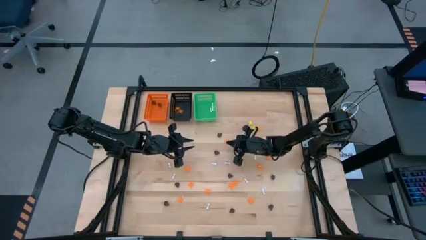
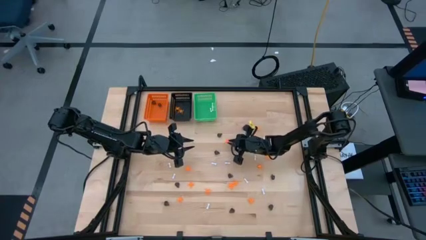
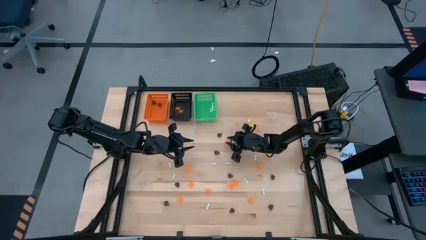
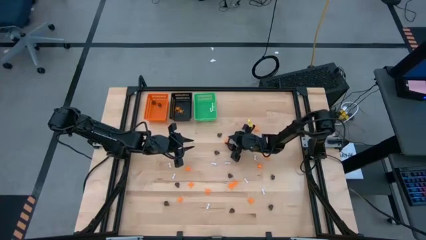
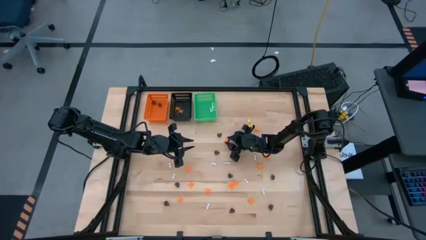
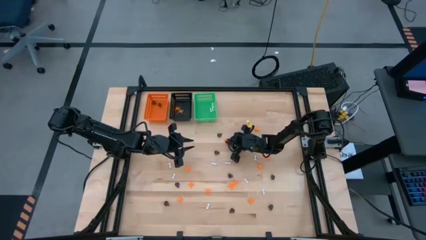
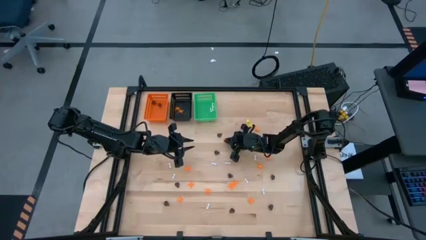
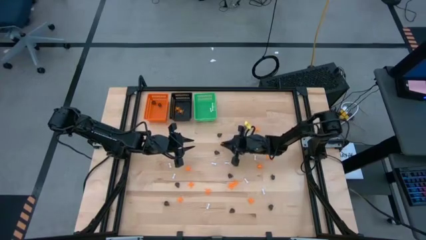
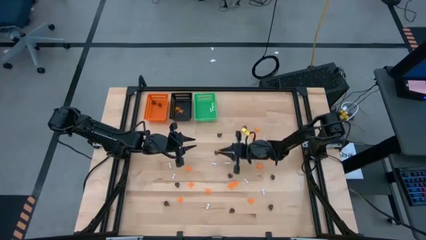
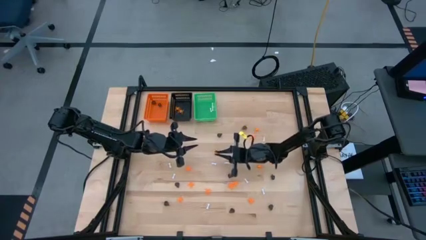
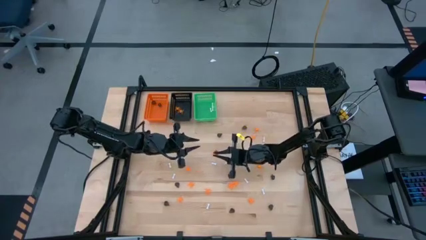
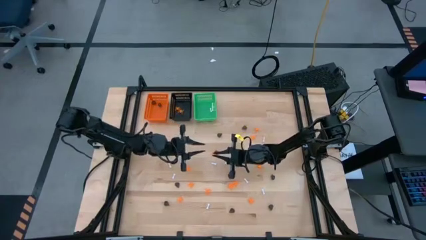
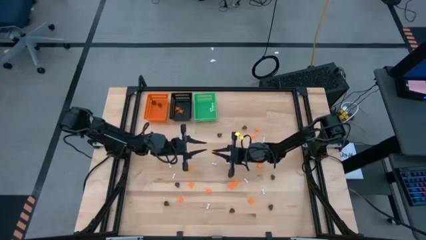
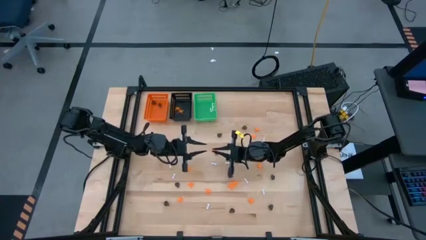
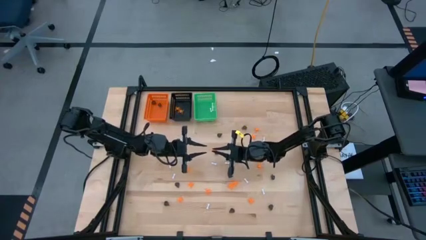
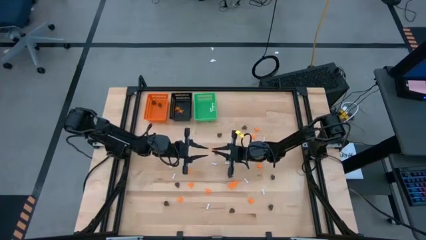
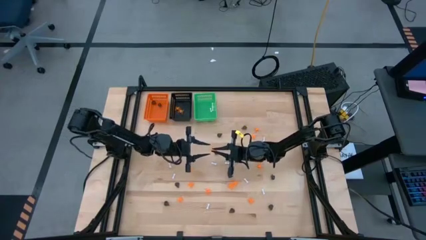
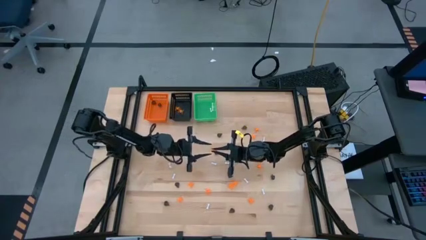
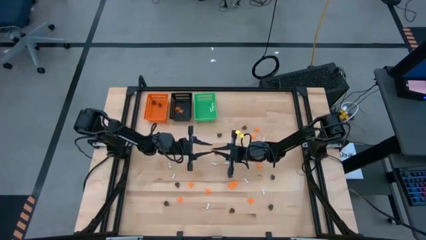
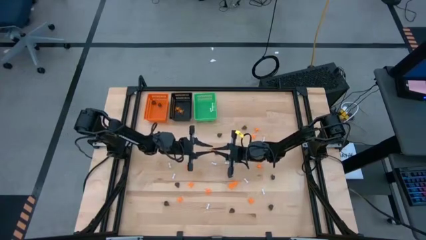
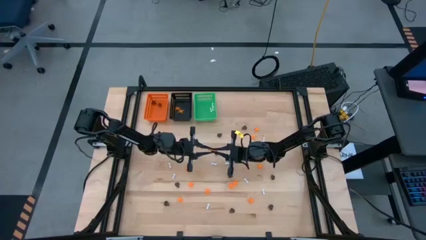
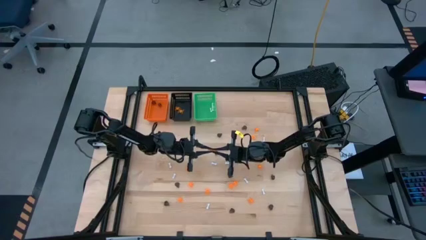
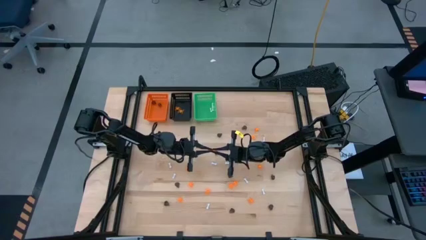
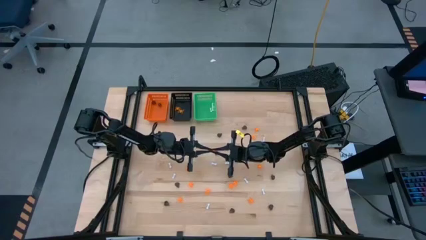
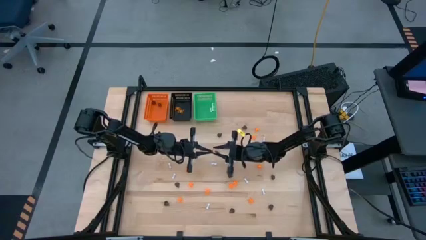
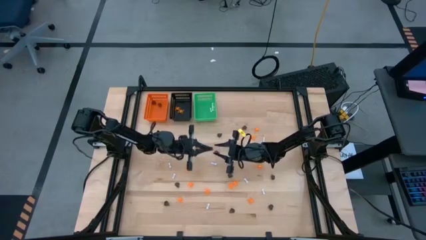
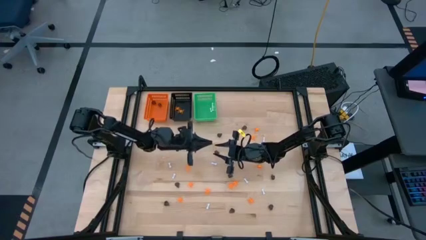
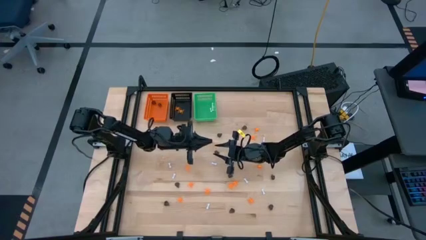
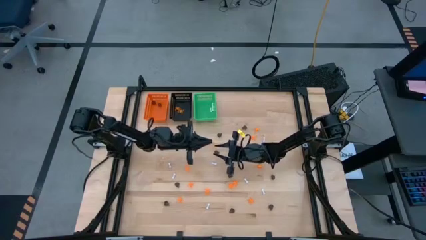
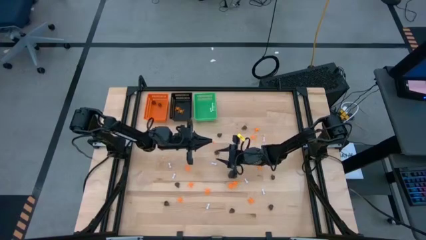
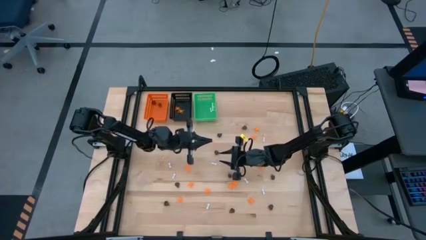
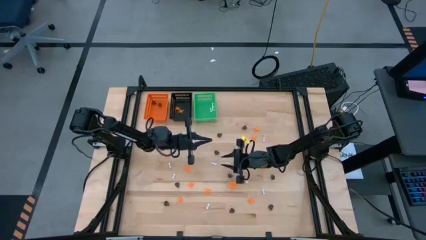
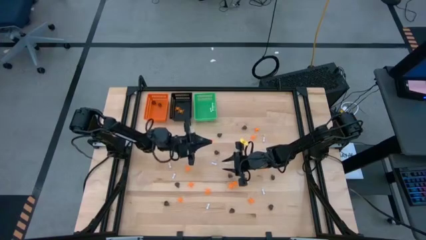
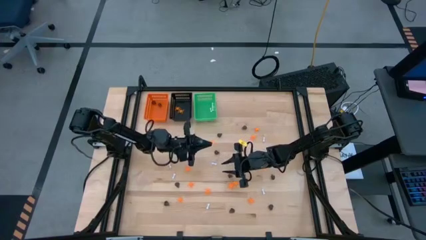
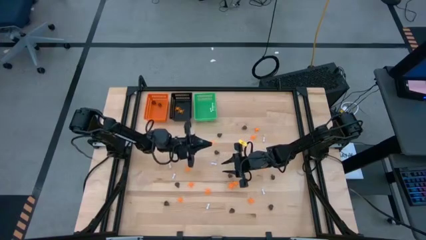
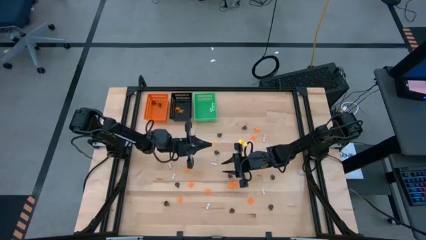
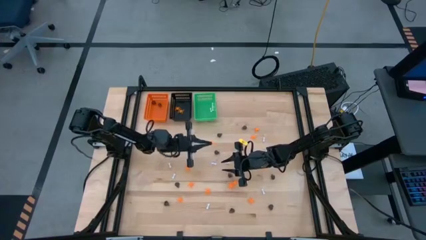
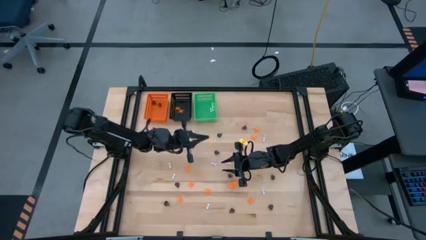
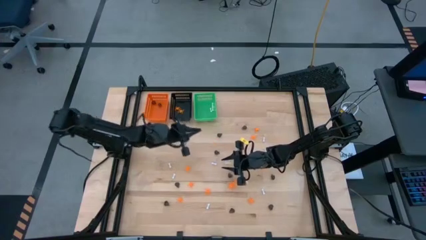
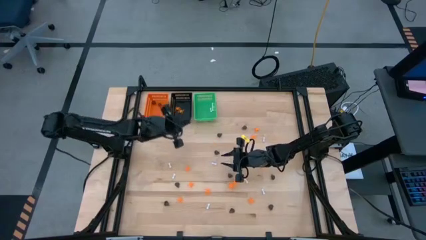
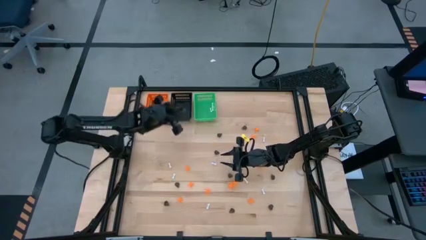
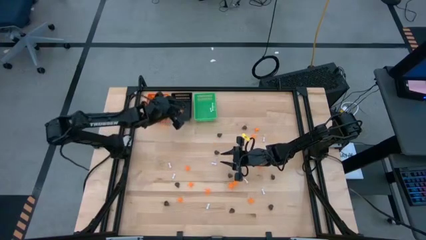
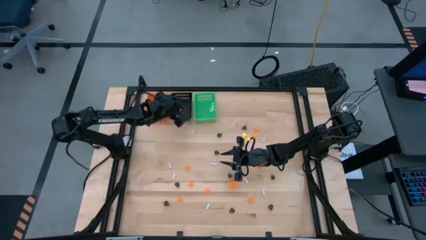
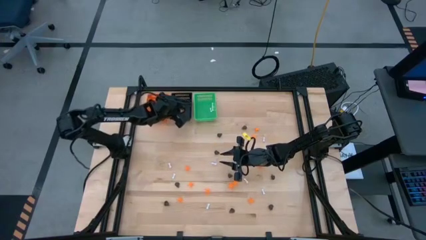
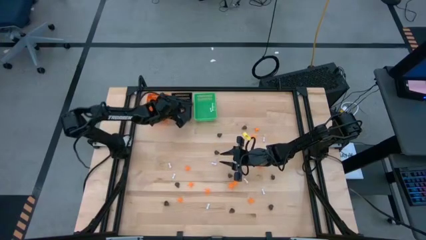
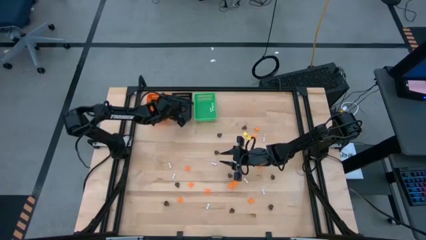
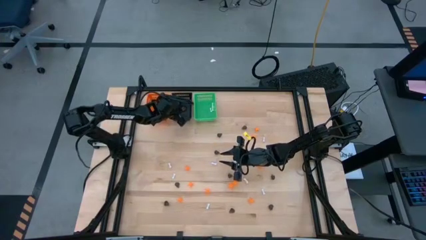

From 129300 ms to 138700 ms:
Task: Sort Halloween decoration
Put the orange spider toy into the black bin

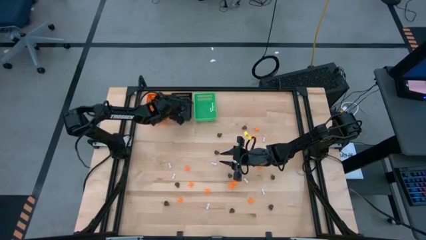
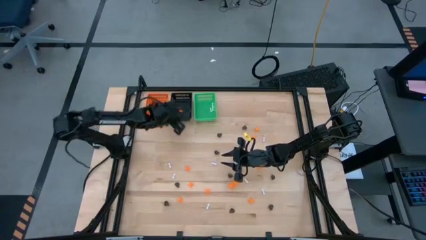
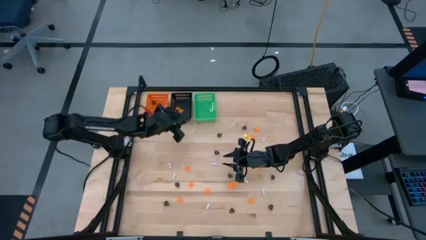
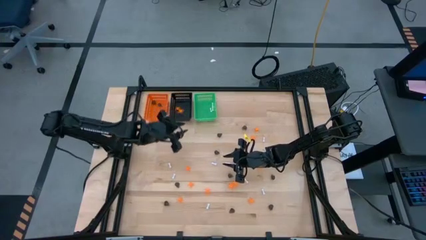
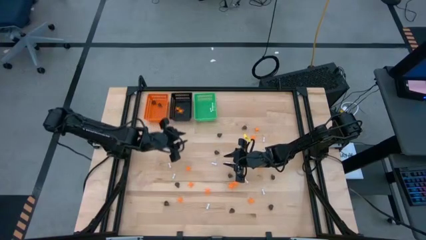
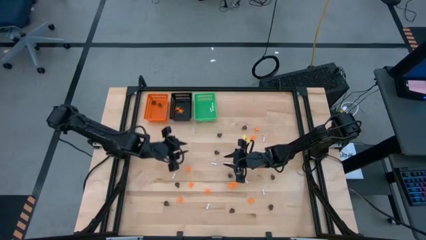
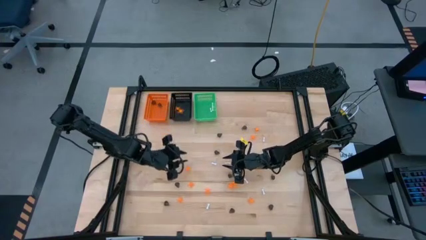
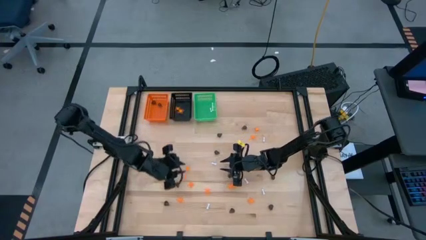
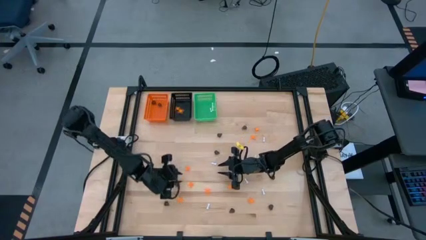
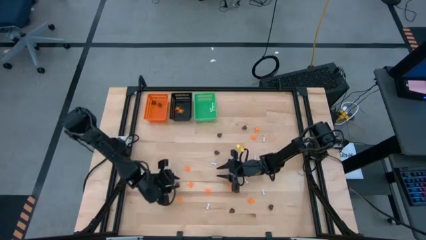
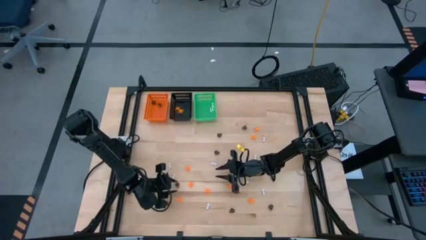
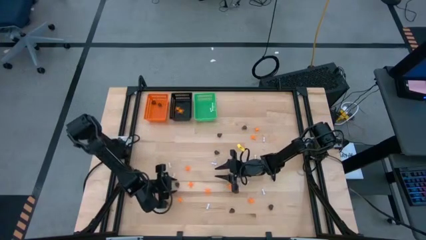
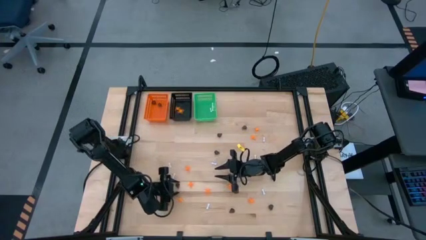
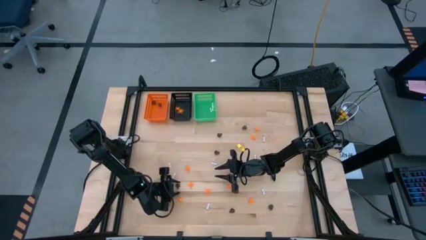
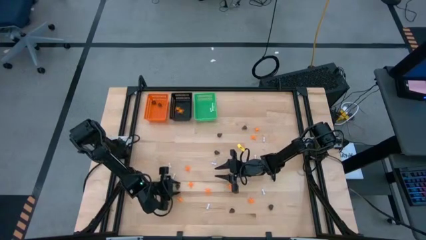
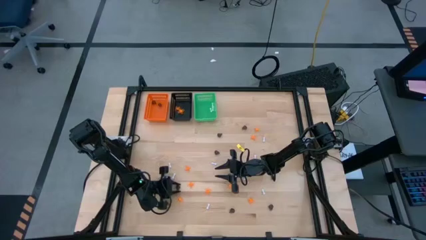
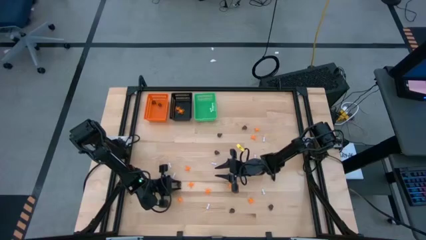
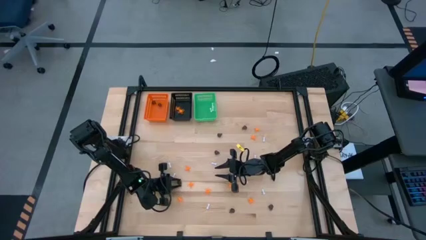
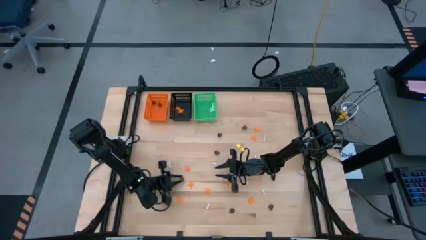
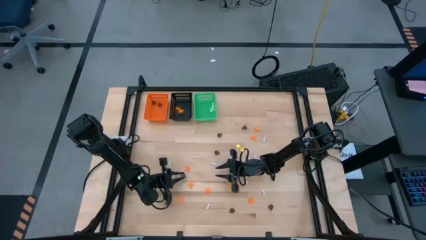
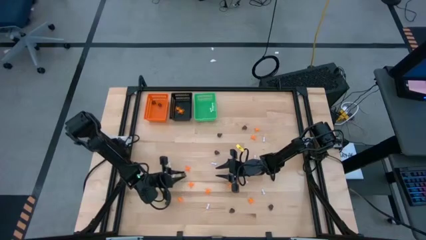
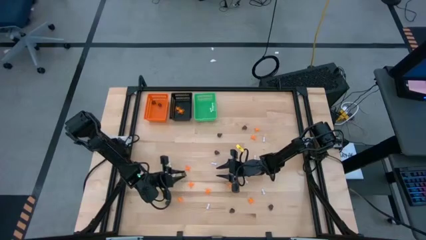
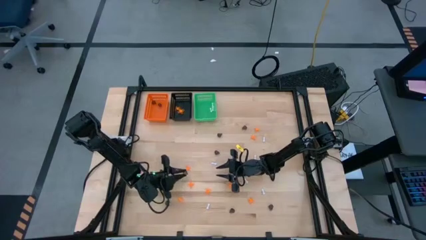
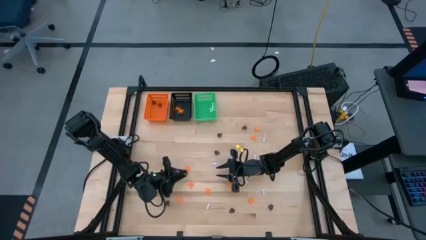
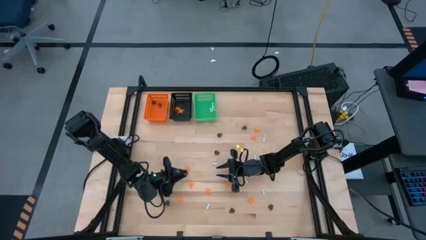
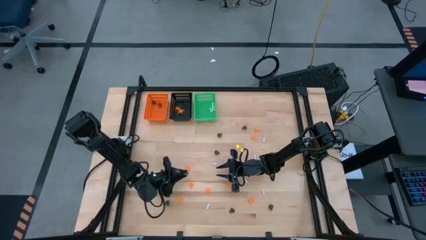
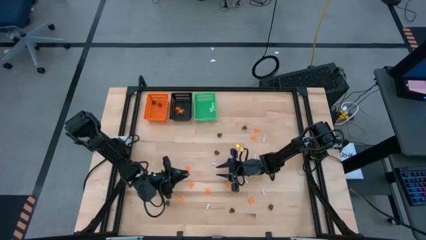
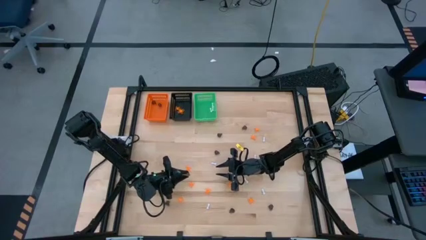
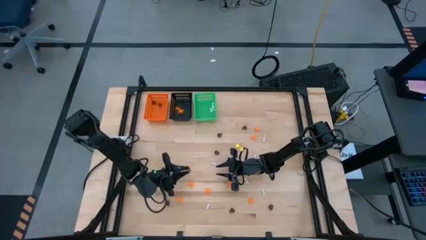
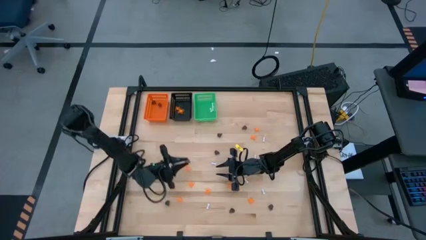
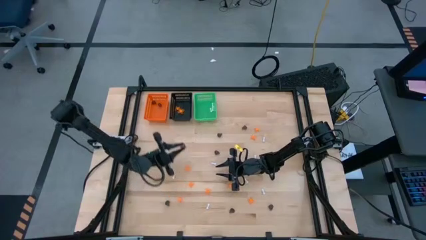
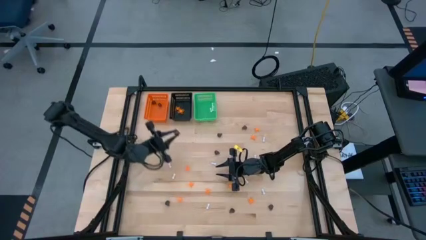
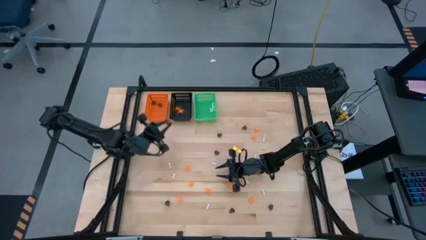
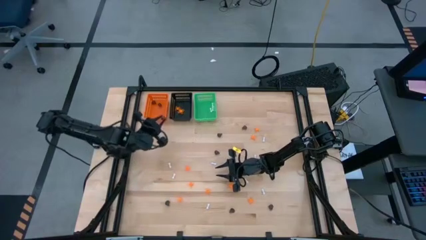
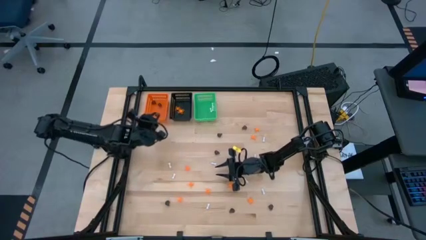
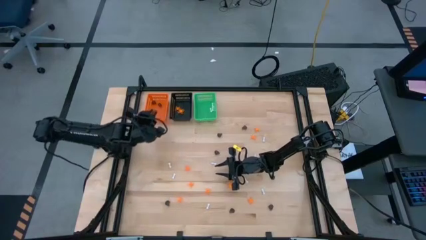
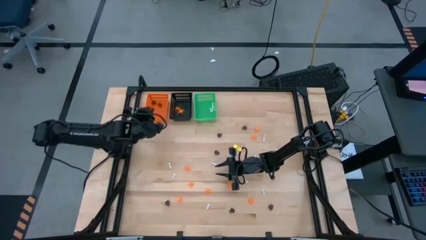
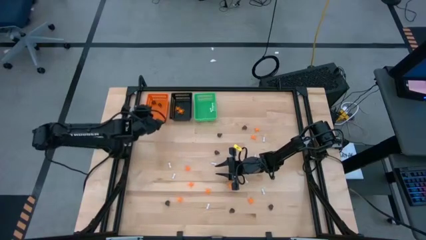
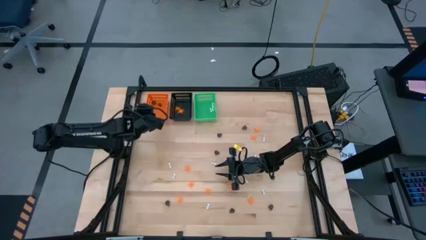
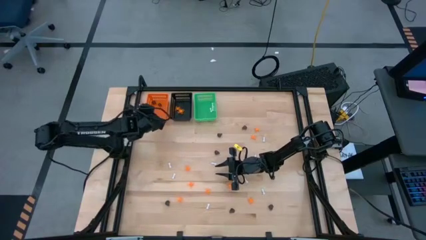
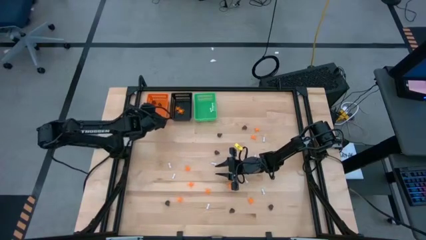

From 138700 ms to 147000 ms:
Put the black skull toy into the orange bin
